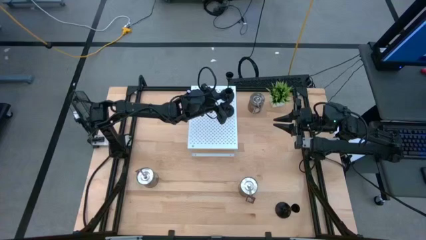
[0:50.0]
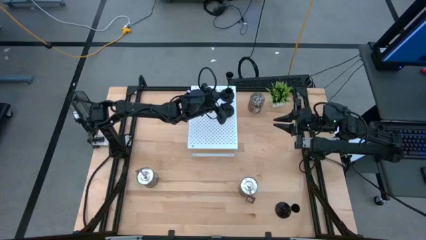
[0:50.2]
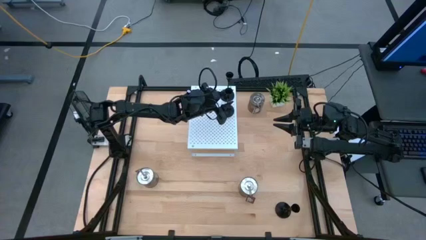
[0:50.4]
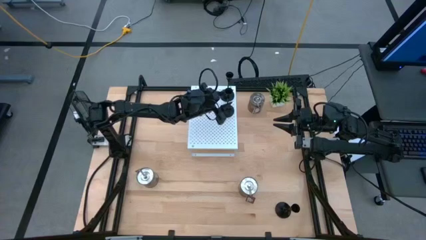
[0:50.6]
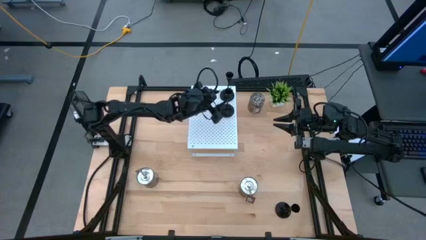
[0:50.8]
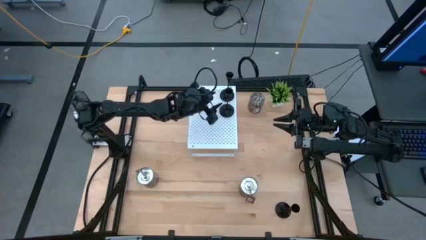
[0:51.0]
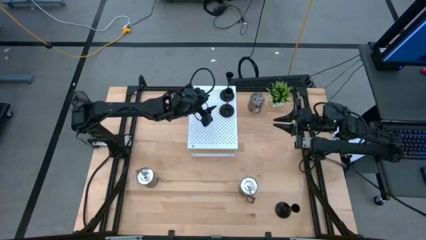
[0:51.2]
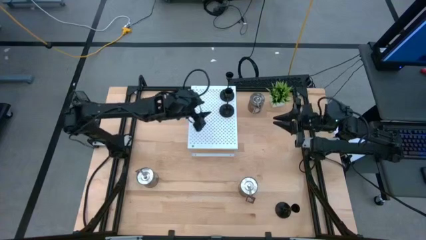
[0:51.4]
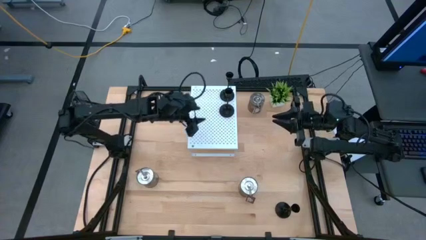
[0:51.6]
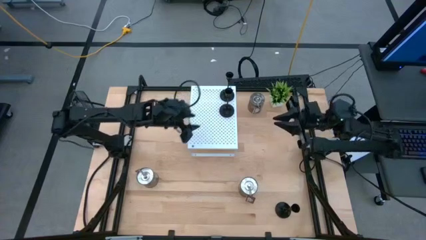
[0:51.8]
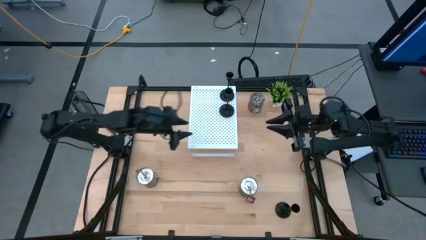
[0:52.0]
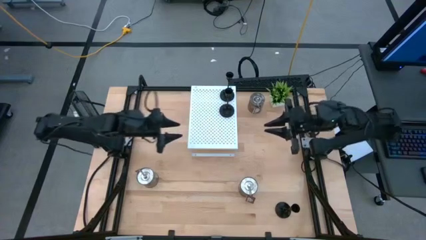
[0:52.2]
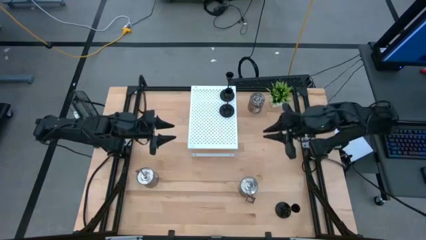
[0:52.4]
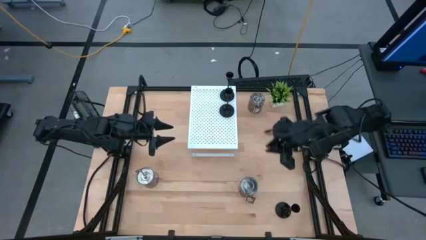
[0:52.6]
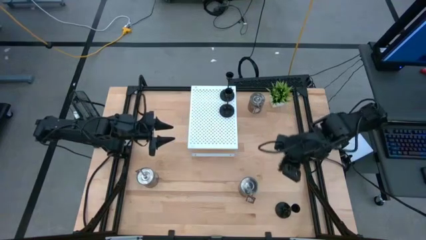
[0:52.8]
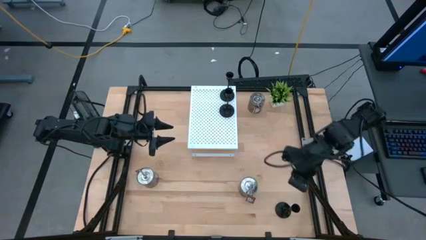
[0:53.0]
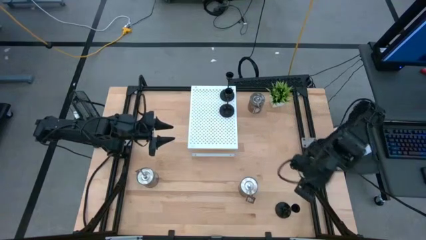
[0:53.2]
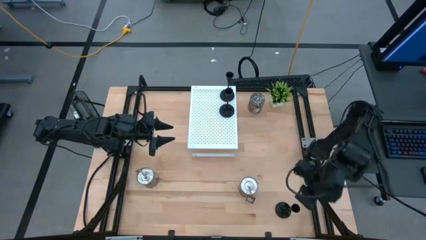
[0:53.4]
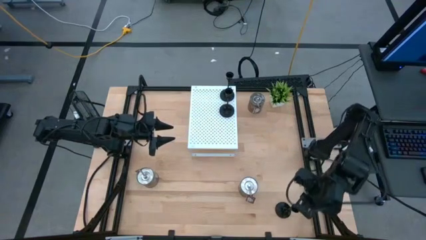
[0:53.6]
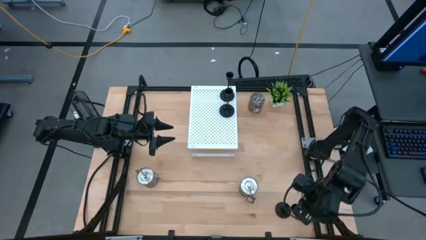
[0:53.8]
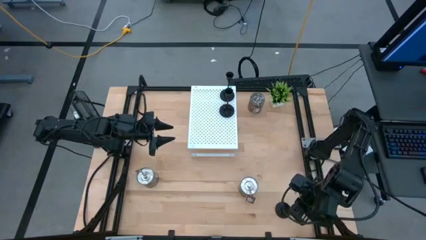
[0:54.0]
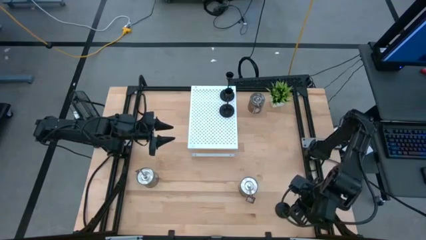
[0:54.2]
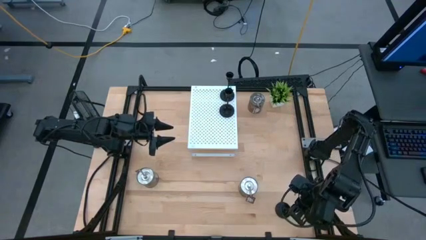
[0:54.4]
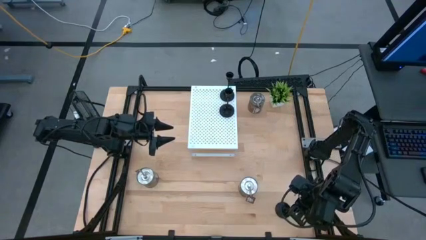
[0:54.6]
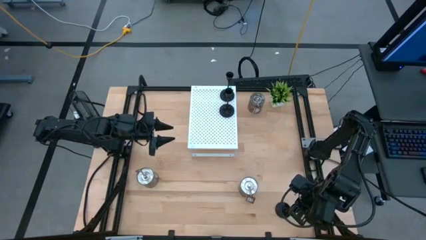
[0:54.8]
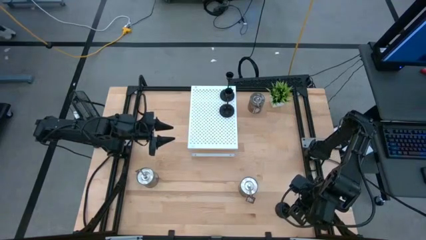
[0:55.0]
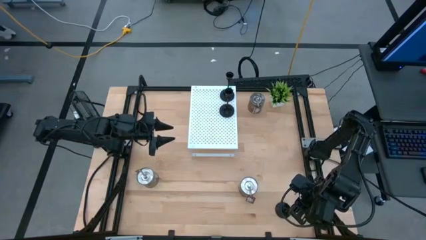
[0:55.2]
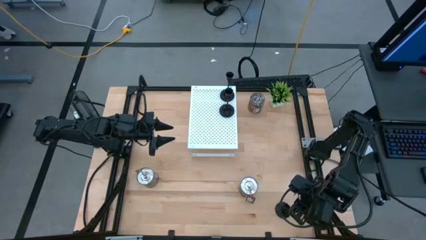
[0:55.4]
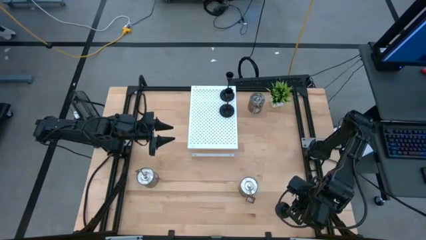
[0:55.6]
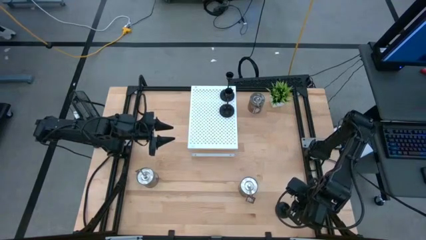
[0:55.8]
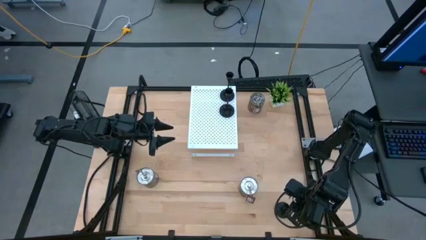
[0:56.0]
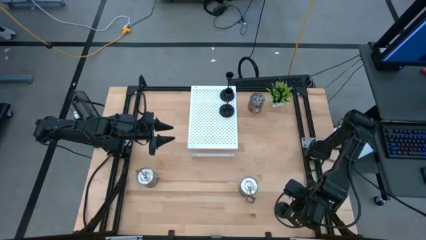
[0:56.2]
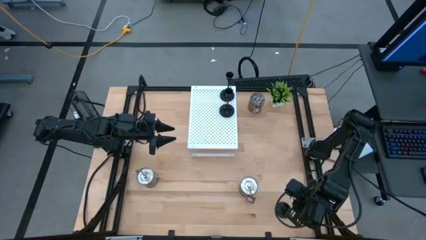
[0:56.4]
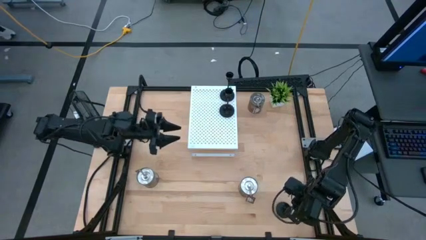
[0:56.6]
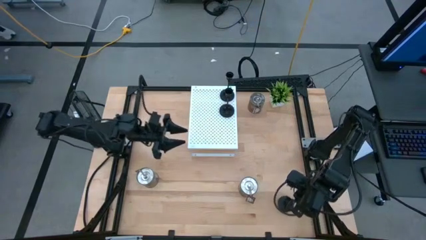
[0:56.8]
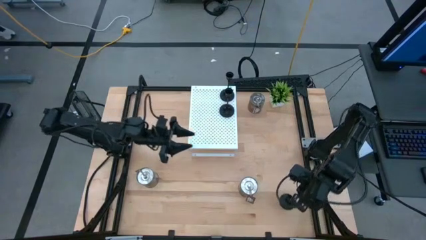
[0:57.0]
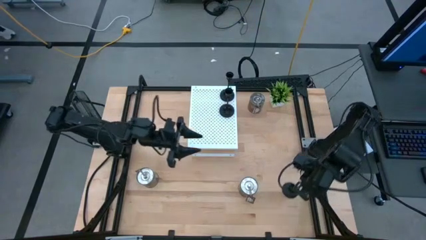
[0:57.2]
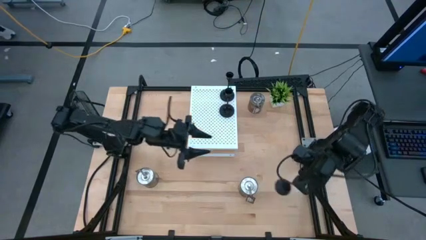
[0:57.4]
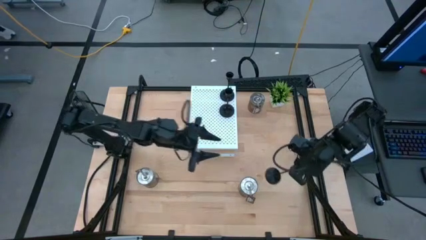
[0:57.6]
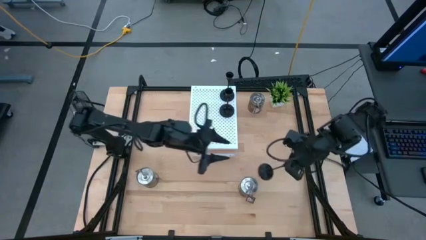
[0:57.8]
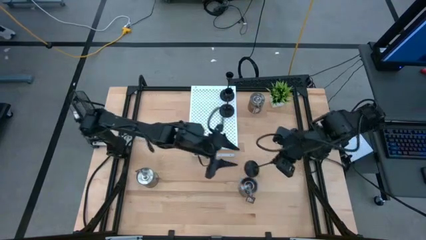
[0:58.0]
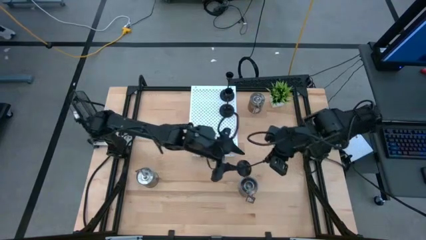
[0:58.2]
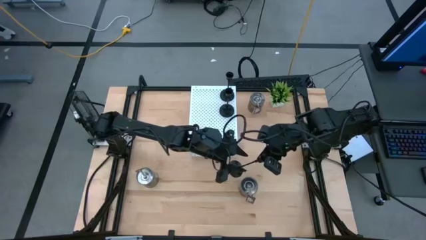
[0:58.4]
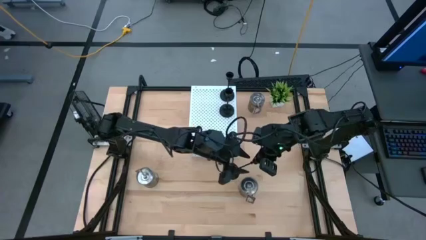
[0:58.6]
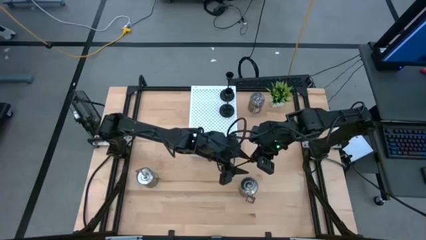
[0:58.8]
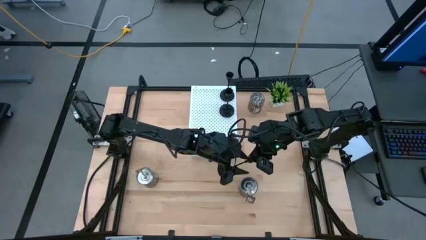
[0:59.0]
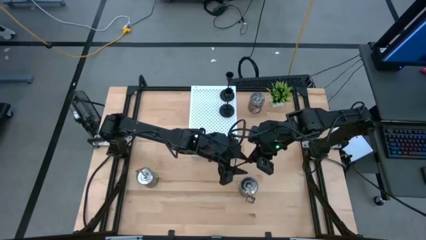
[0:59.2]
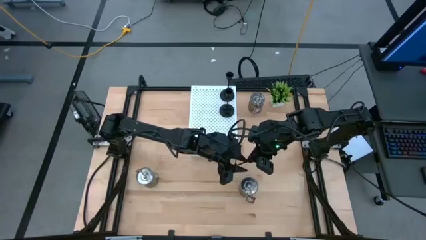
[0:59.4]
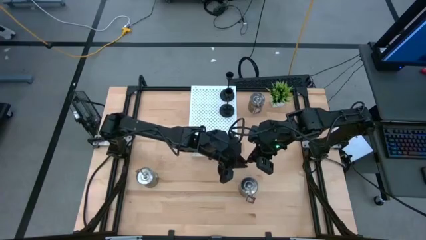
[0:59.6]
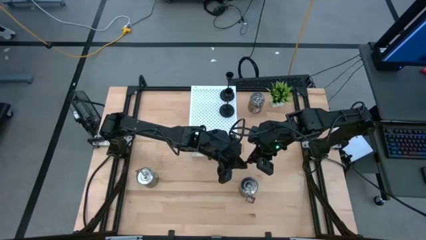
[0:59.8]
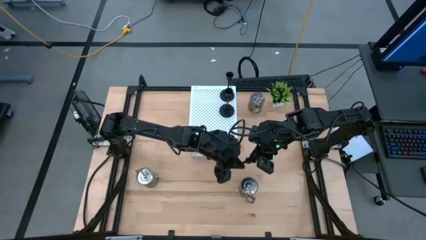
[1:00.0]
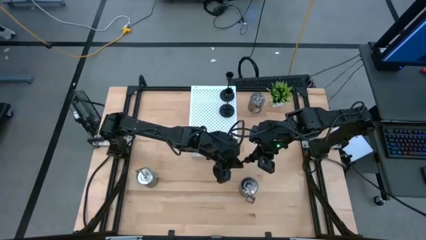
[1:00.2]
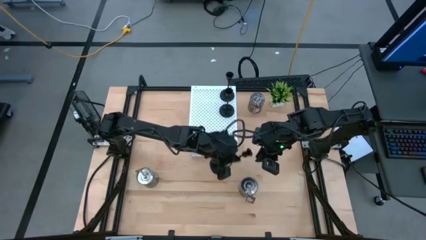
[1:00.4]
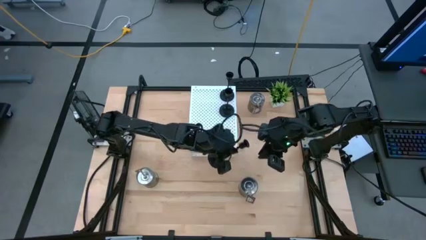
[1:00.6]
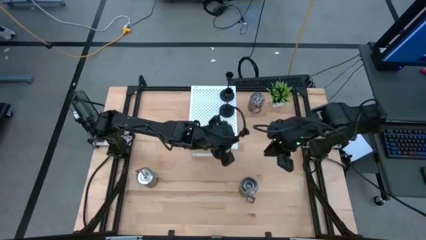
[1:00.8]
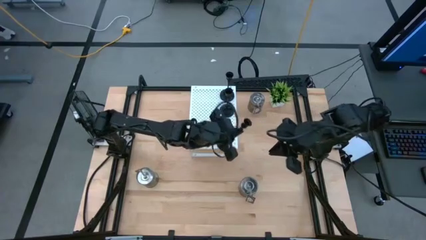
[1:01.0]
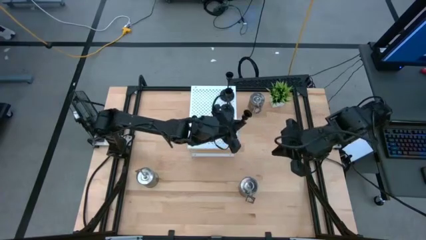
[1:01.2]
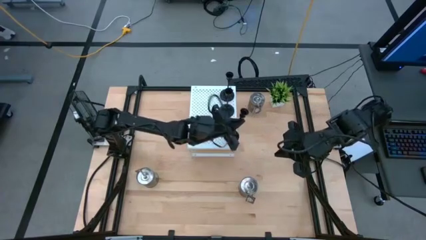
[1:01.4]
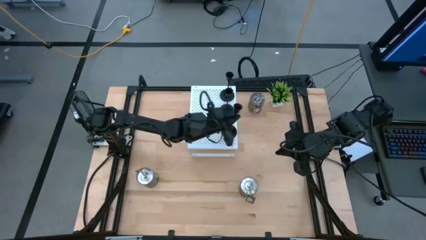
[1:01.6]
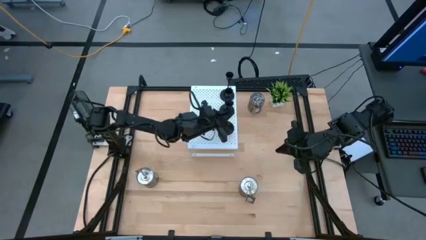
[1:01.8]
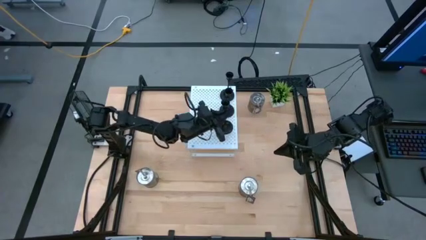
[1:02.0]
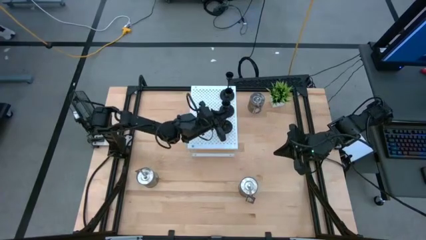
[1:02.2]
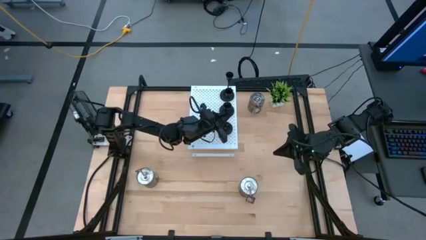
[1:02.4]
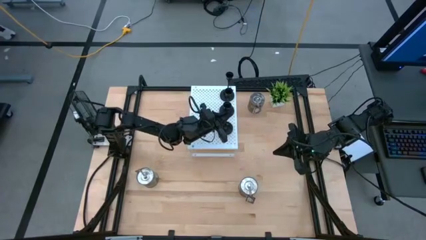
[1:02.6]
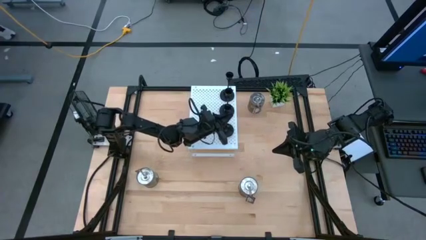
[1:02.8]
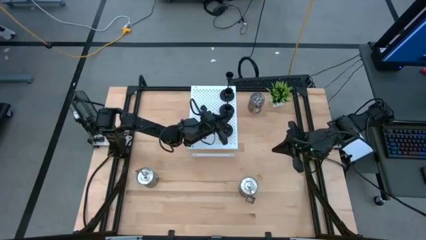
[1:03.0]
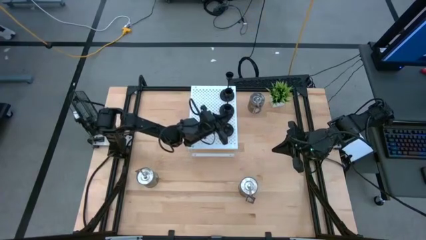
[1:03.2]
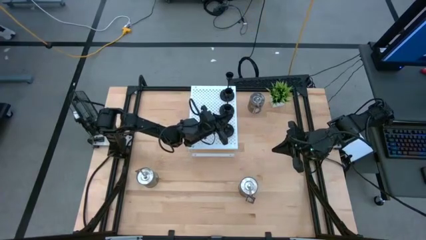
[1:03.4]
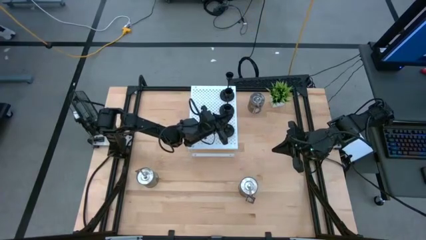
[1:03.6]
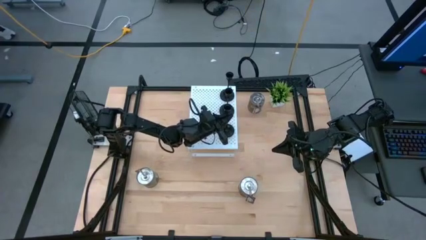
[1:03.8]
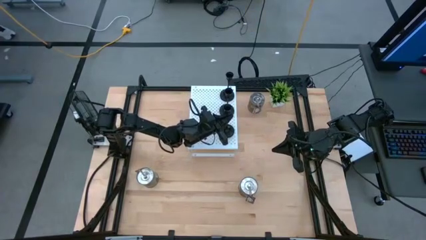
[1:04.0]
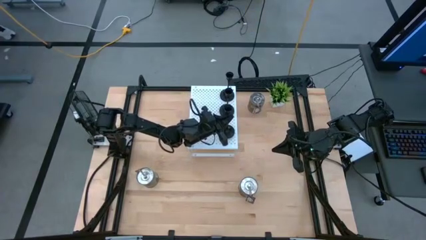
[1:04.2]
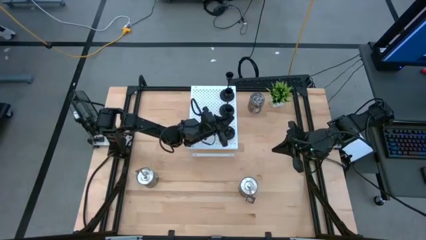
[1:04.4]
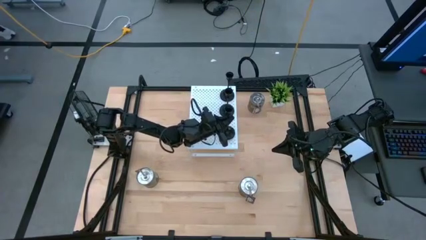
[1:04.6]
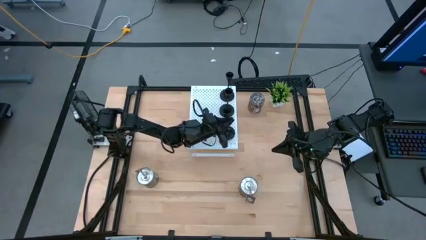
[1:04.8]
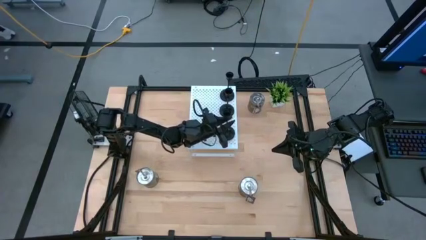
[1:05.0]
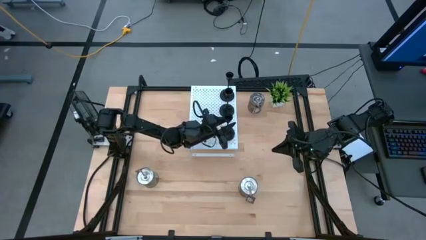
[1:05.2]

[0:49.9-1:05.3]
Task: Pick & Place candle stick holders
Put the black candle holder on the shelf aligned with the other black candle holder

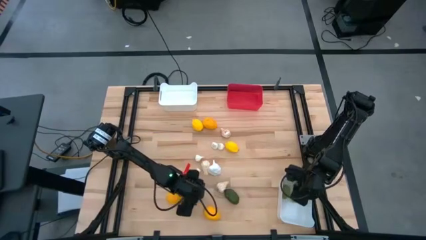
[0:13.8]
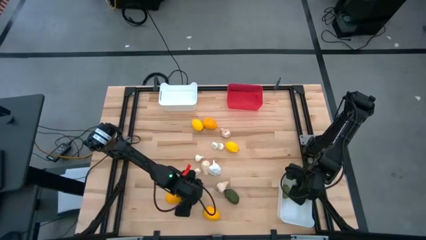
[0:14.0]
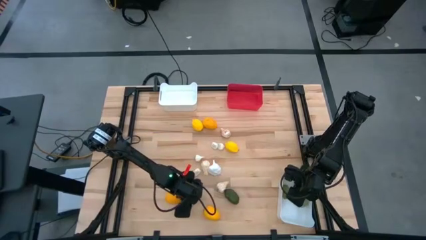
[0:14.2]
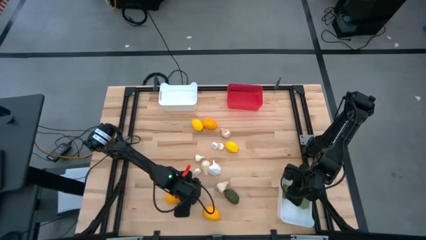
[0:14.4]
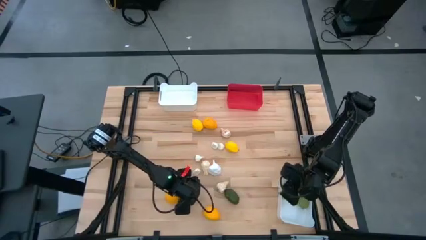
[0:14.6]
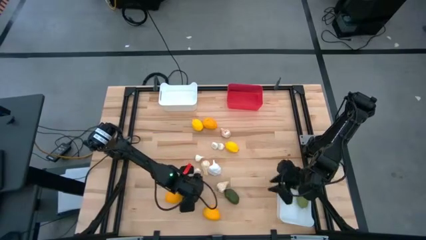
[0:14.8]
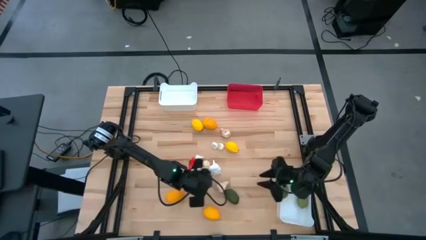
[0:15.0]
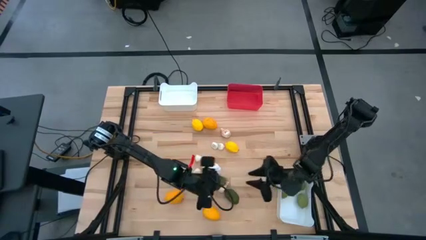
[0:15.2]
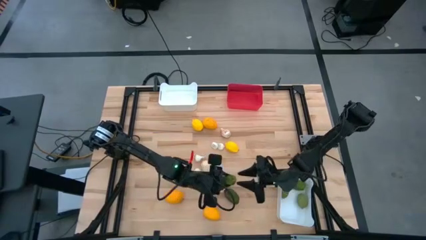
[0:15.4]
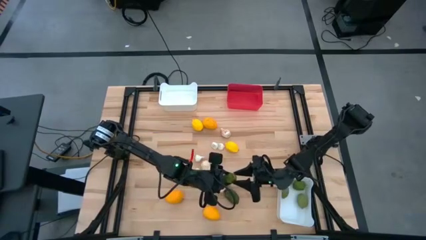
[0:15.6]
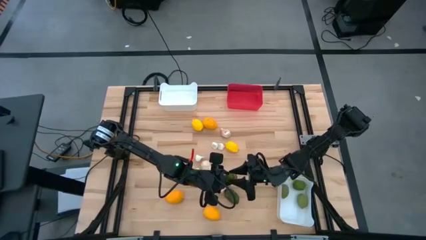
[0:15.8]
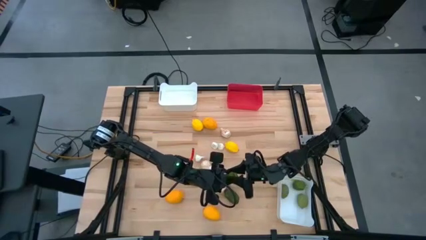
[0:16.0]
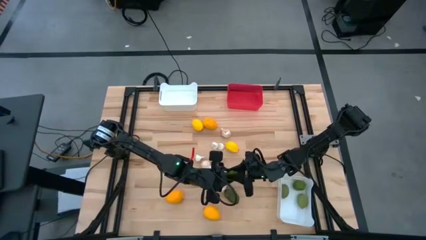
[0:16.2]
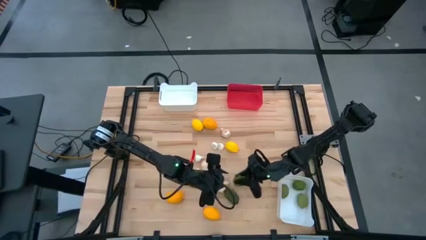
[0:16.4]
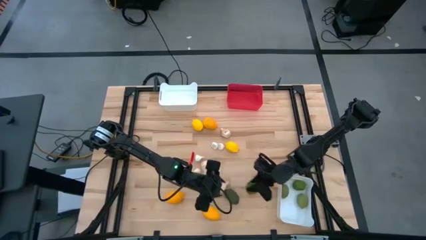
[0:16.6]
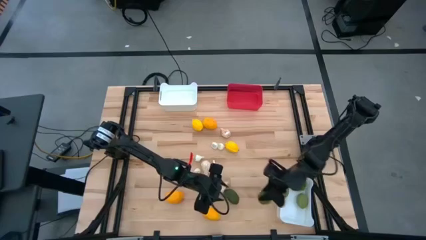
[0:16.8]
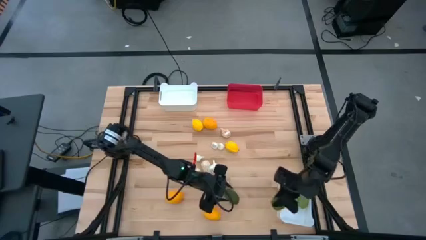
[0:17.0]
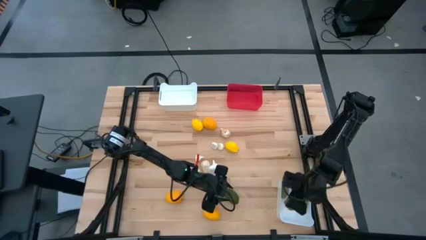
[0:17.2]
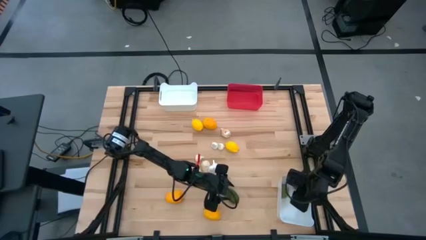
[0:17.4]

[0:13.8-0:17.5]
Task: Sort produce into baskets
Put the green lime into the bottom white bin
